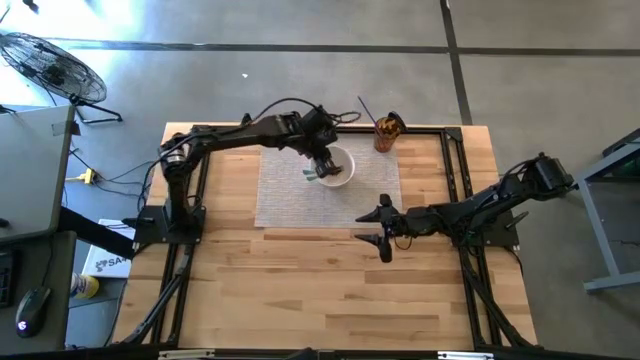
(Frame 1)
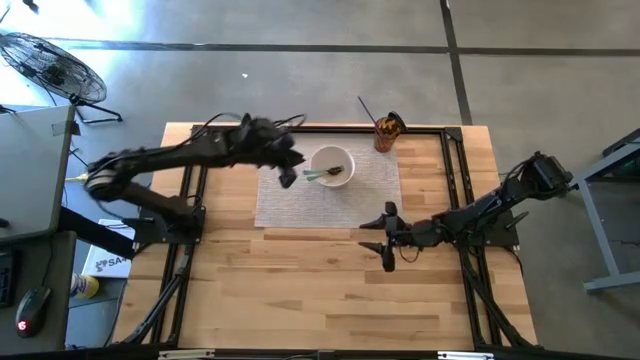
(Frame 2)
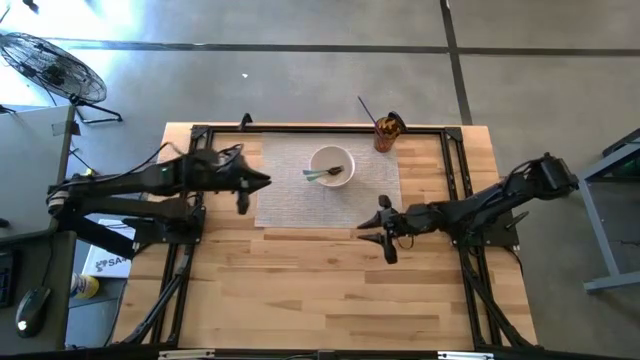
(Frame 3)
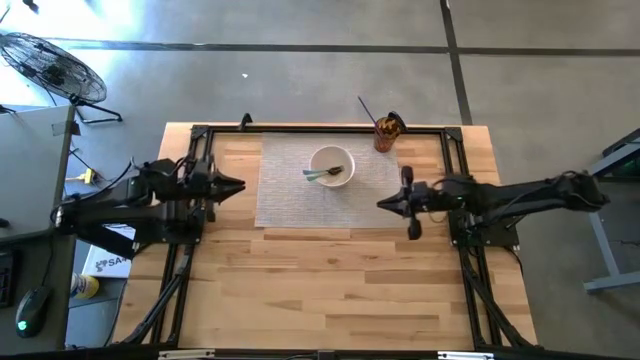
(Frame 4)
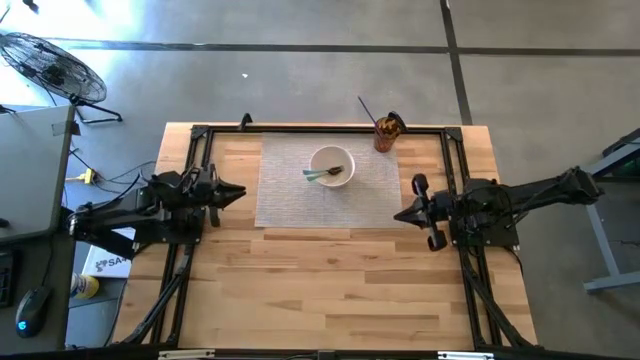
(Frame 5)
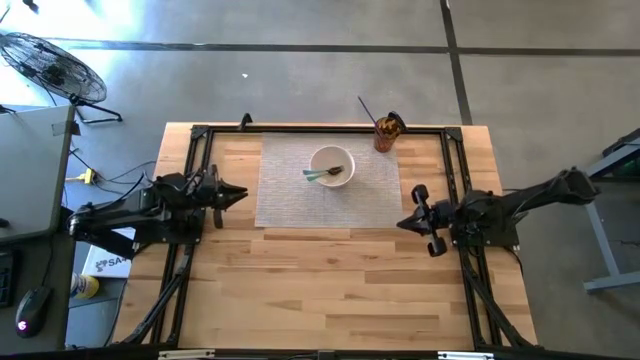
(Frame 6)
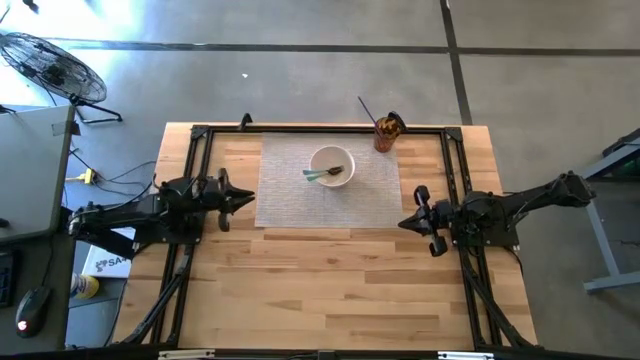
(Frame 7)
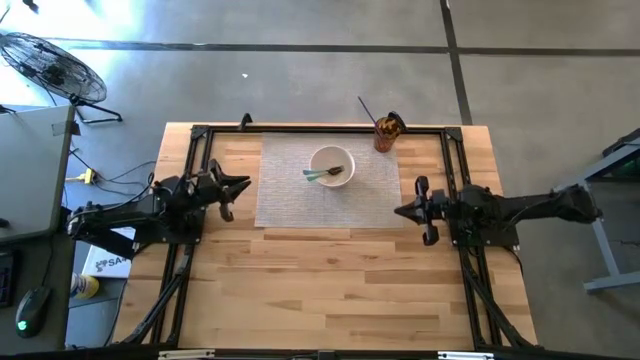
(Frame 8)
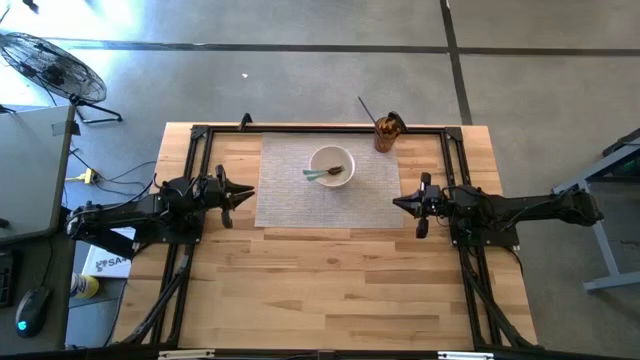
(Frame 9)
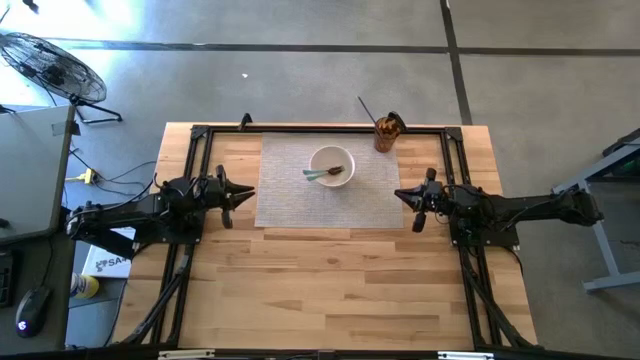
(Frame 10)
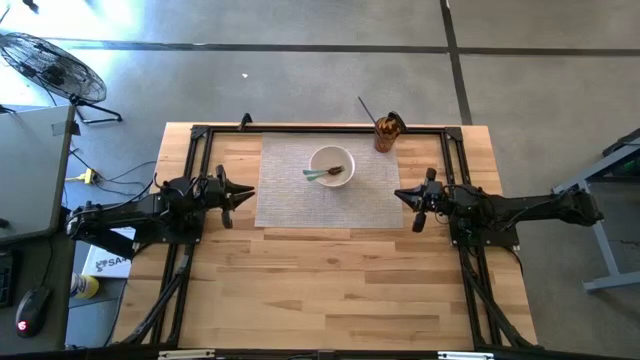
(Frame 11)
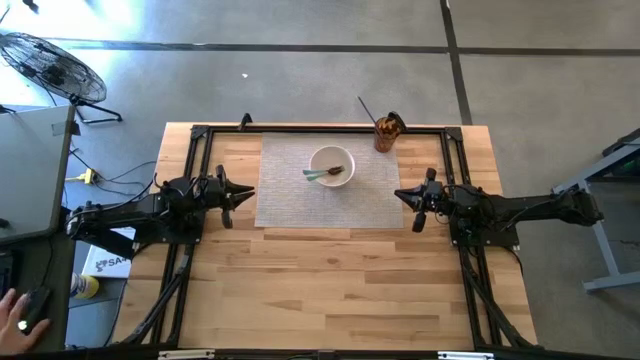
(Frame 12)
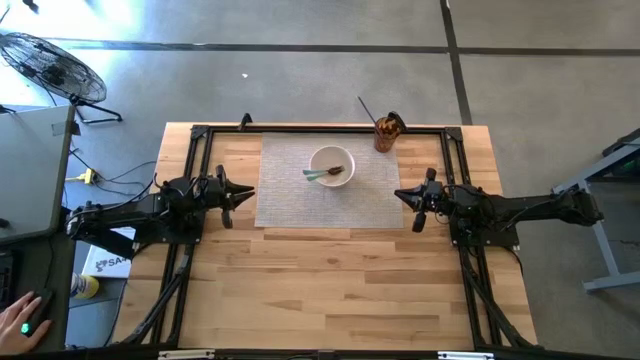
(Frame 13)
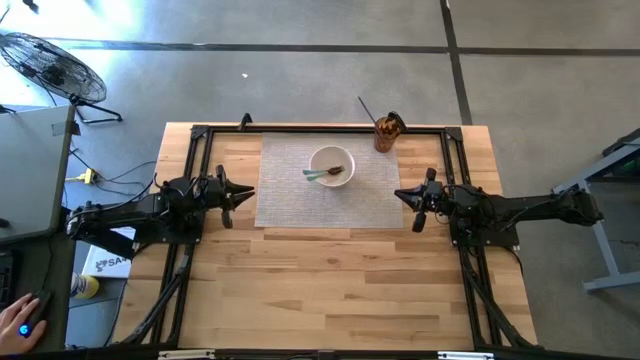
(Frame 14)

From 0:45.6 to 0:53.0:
Task: Pick & Place Utensil
Return to Home Position

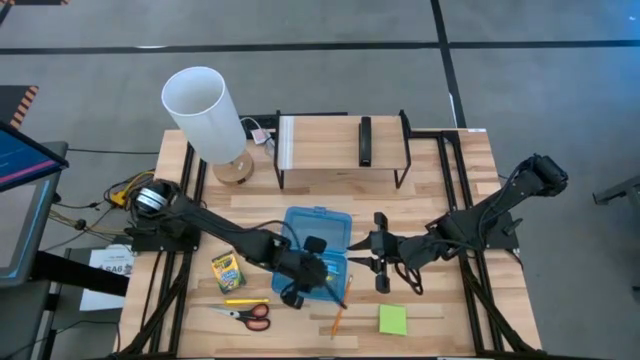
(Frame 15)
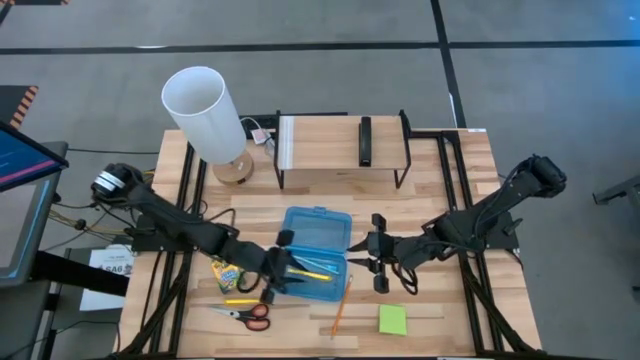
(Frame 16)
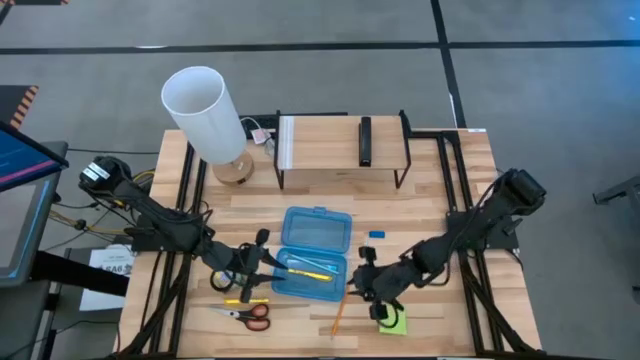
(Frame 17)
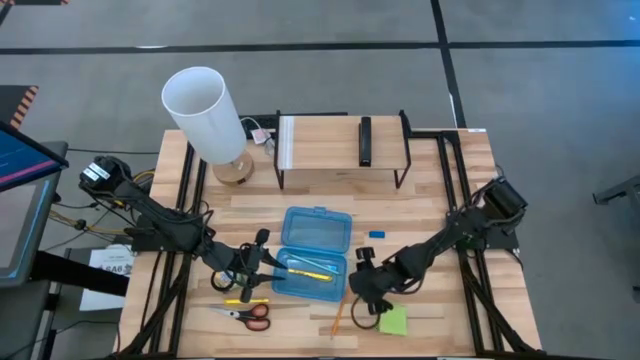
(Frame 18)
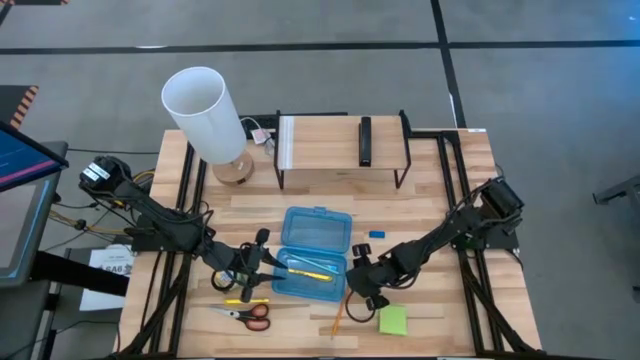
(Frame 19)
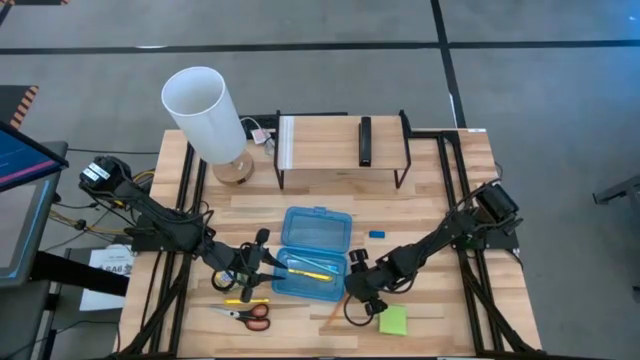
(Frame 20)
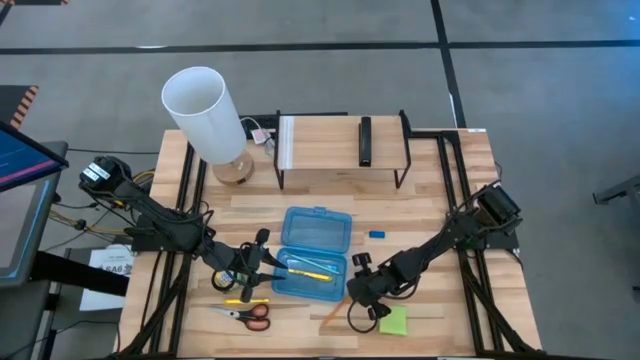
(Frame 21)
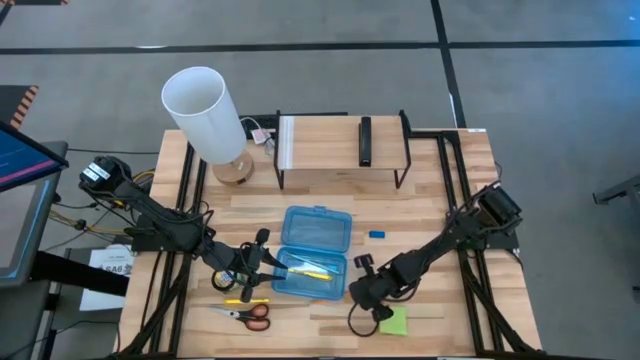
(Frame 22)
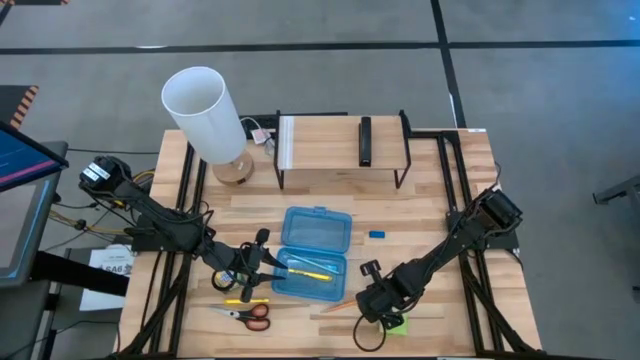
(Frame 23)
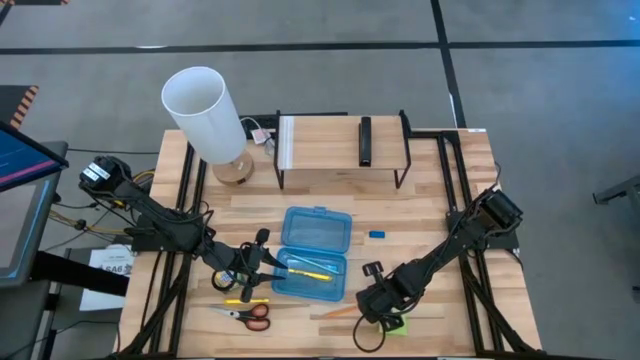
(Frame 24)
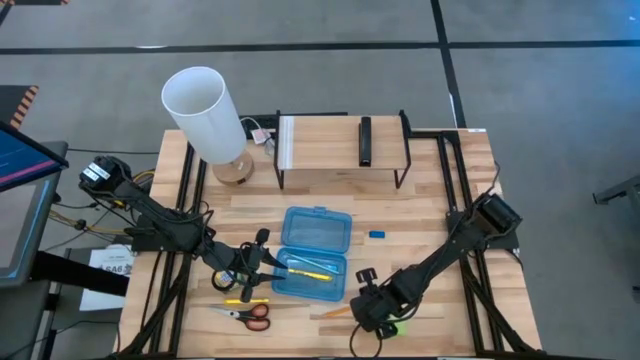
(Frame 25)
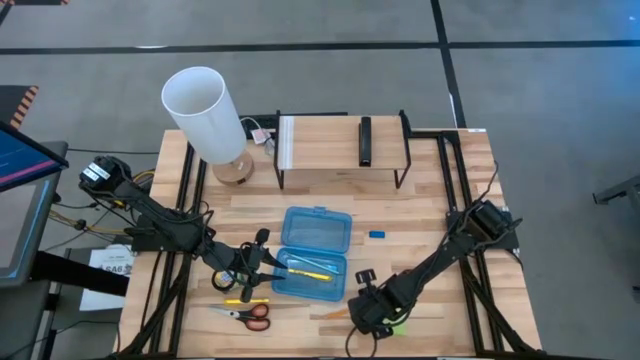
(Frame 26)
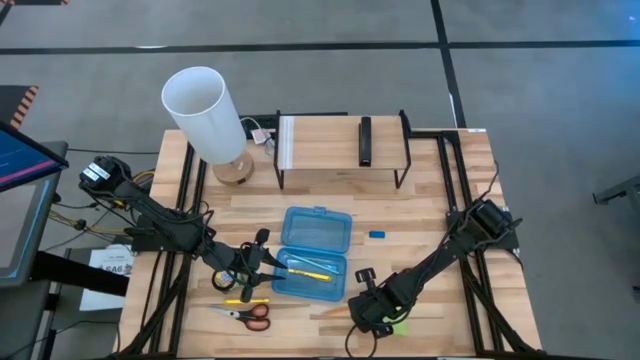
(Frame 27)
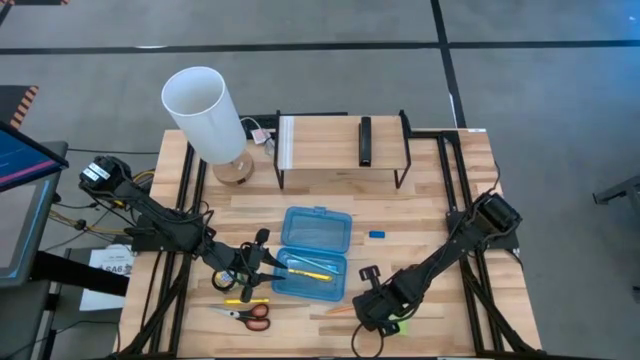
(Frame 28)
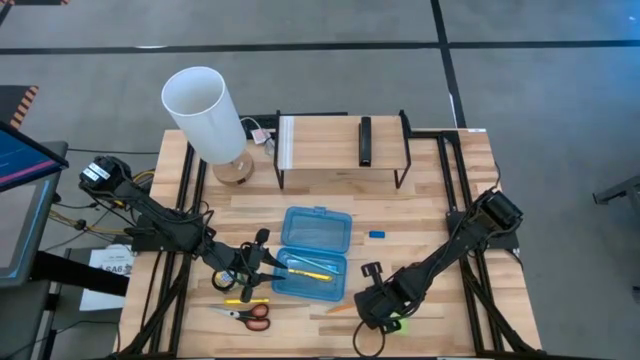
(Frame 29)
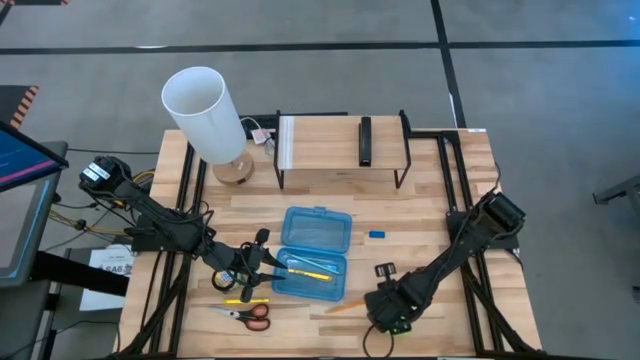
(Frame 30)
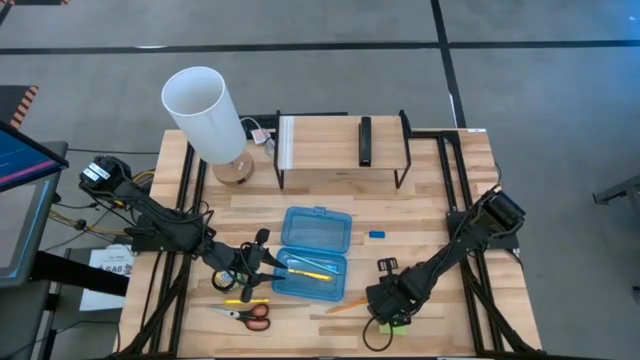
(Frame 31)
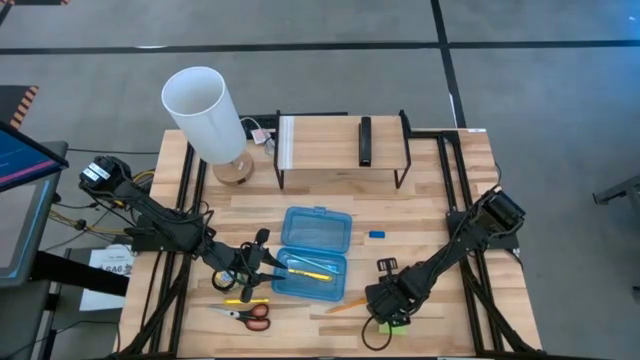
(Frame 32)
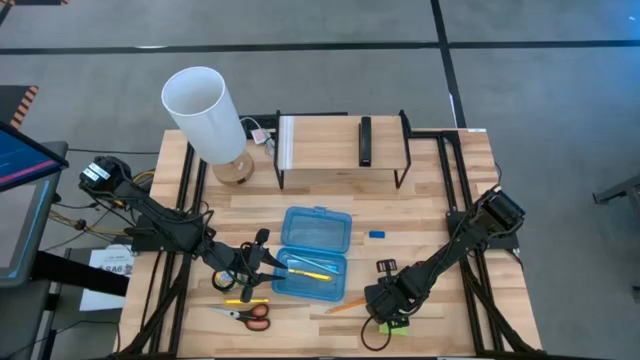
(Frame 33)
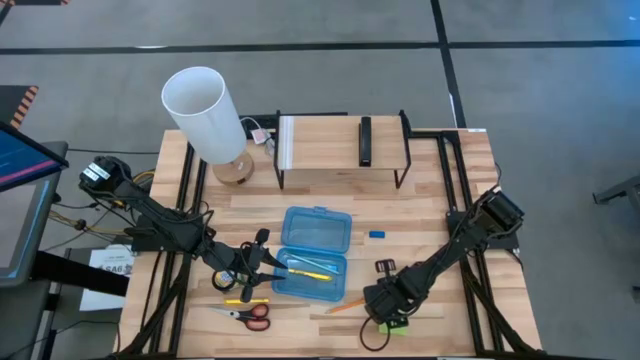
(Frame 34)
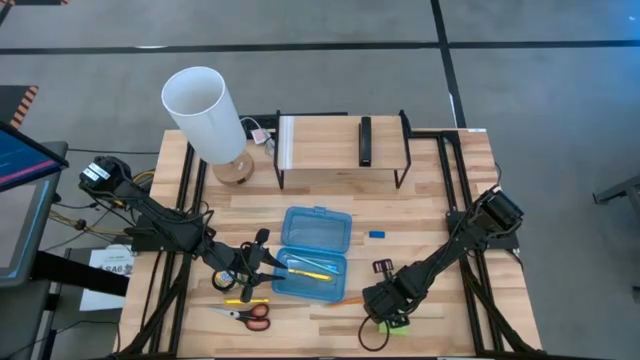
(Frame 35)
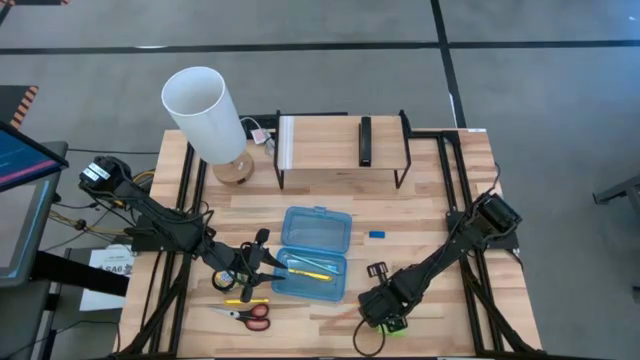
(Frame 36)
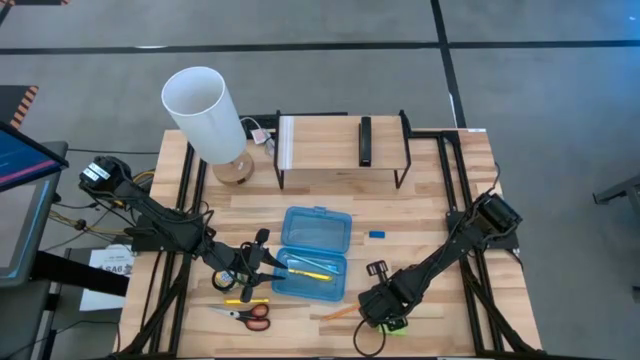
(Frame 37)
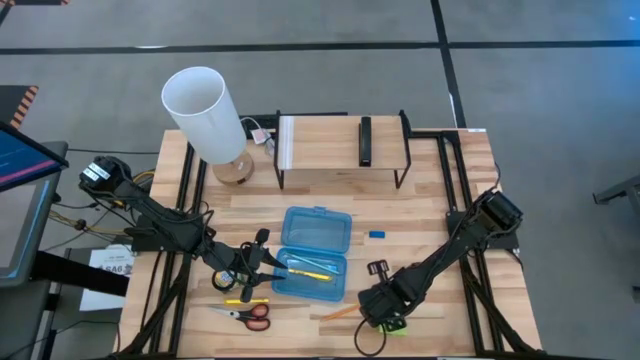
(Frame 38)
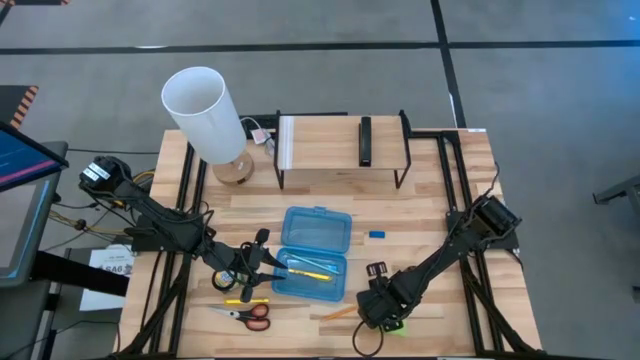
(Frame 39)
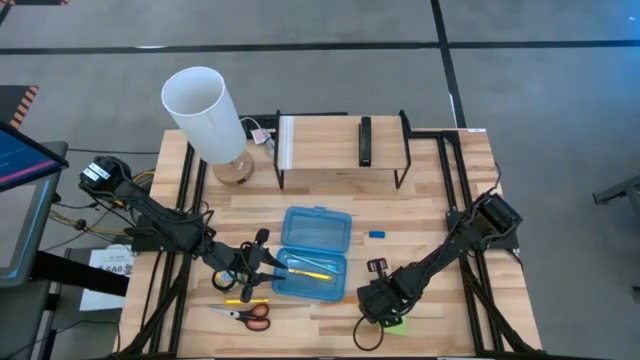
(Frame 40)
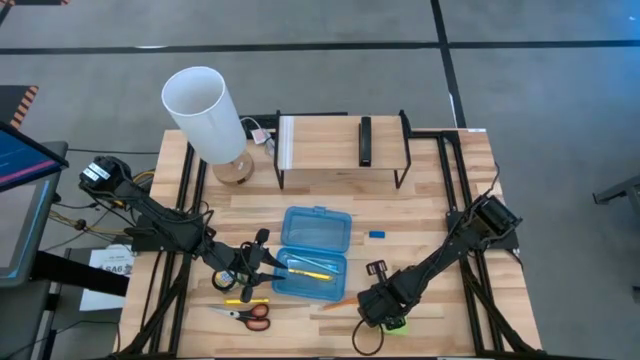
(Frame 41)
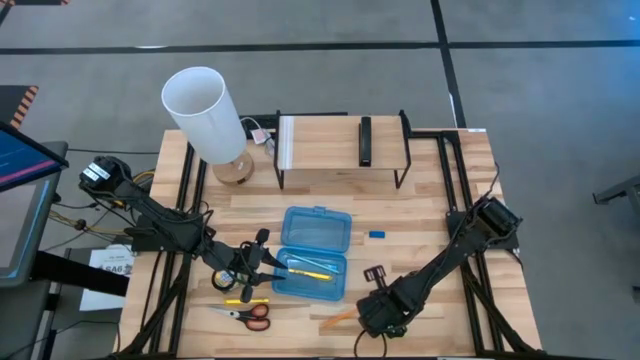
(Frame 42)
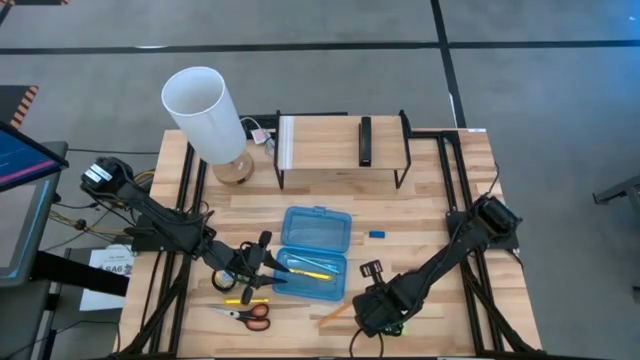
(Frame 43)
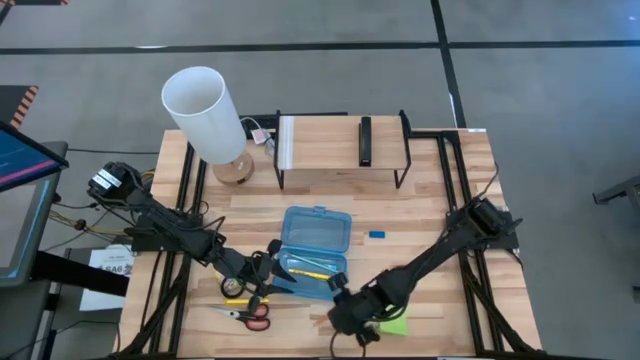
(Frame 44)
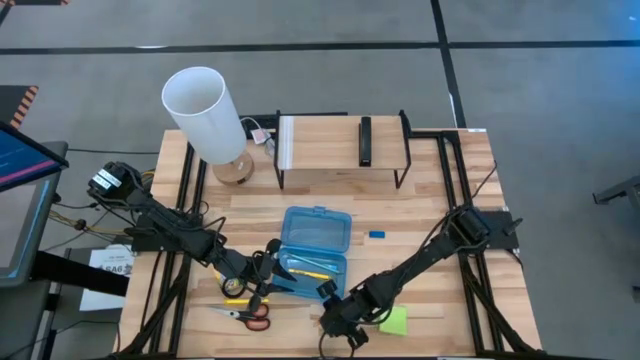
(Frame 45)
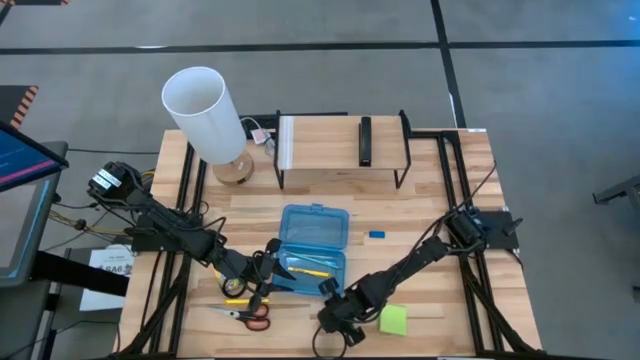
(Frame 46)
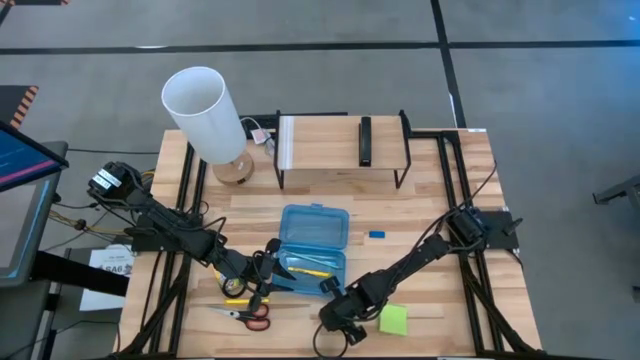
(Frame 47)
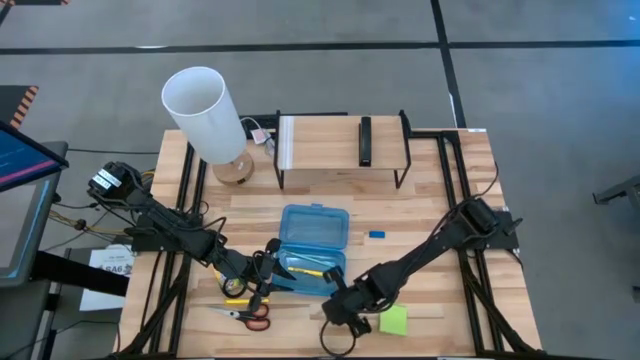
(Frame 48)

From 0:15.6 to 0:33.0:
Task: Pack school essentials
Put the orange pencil into the blue supply box
